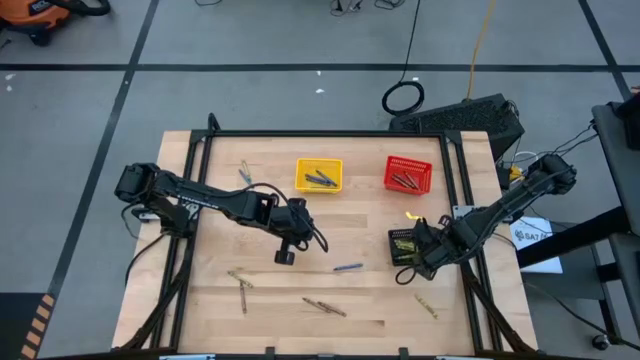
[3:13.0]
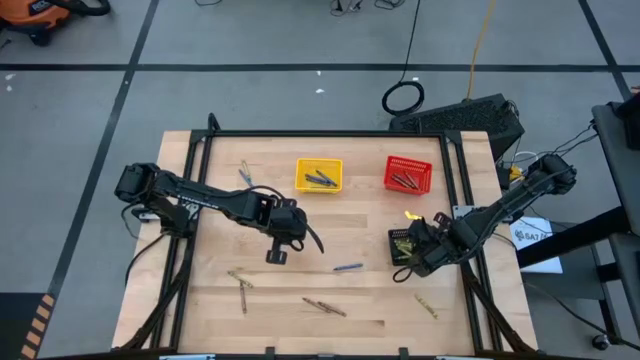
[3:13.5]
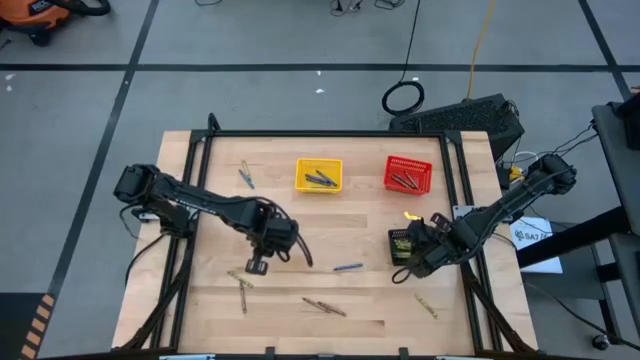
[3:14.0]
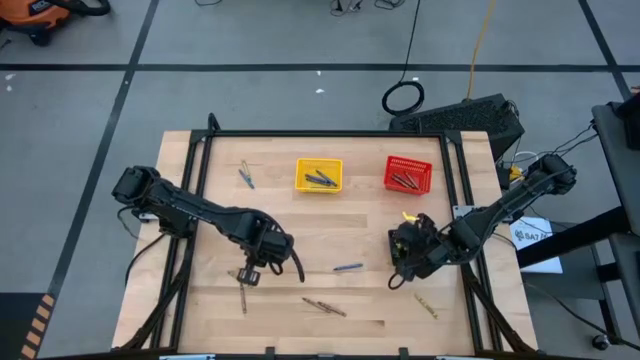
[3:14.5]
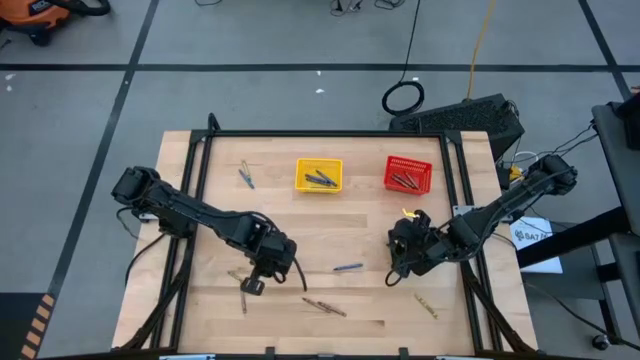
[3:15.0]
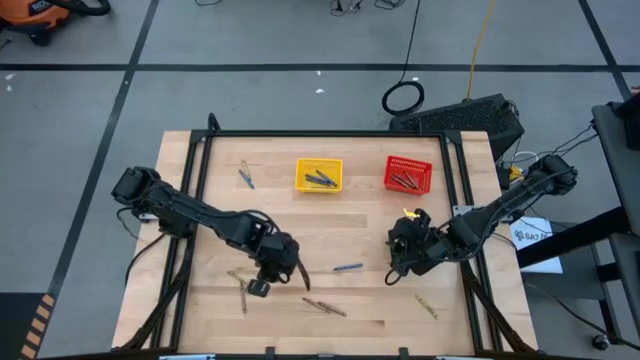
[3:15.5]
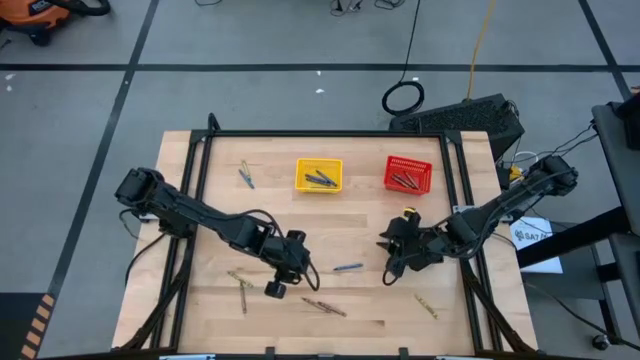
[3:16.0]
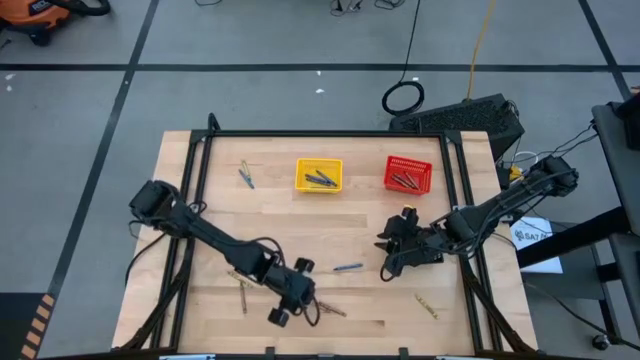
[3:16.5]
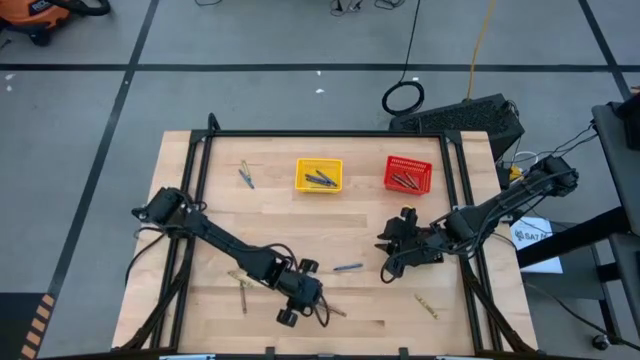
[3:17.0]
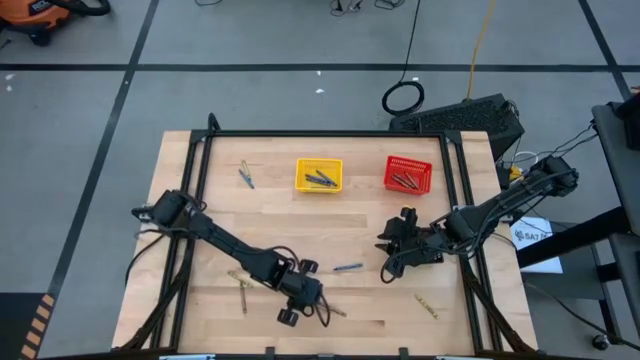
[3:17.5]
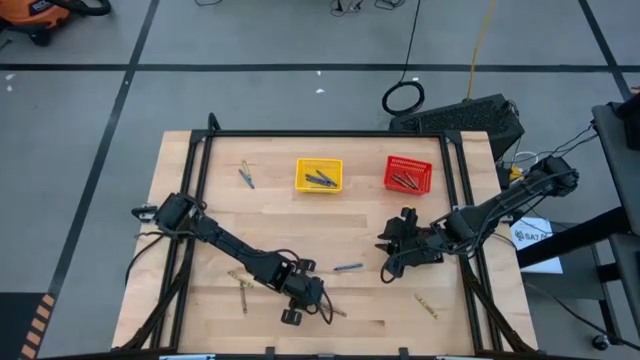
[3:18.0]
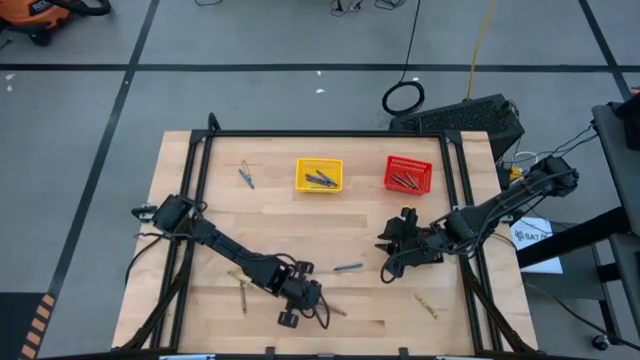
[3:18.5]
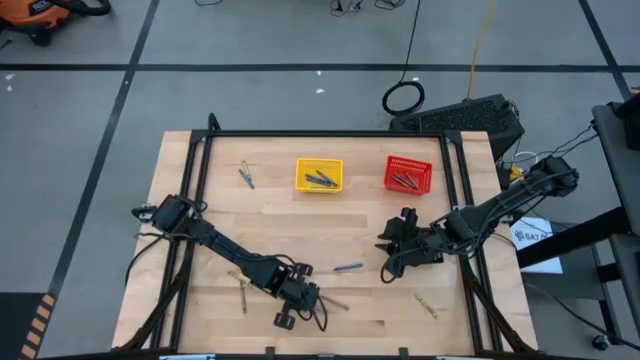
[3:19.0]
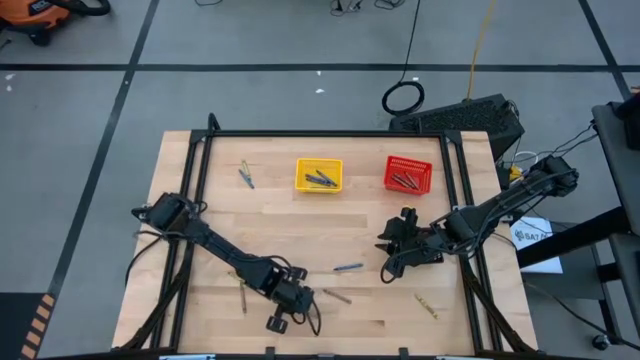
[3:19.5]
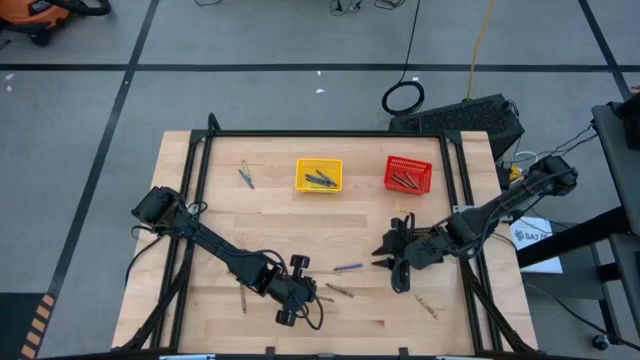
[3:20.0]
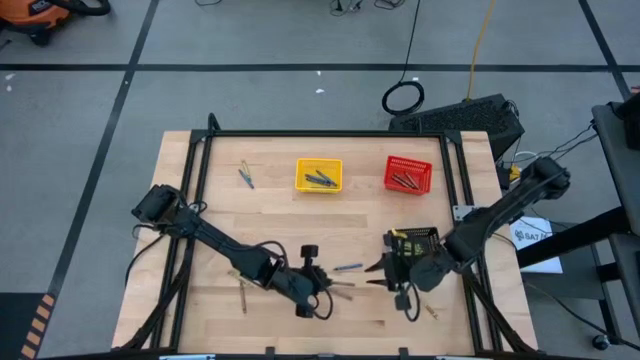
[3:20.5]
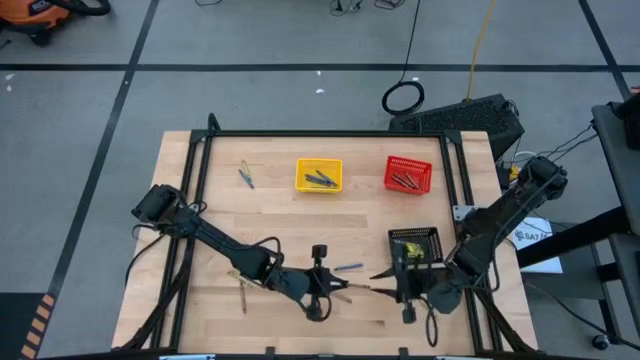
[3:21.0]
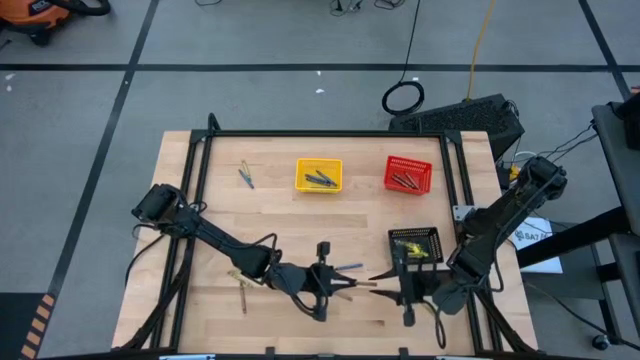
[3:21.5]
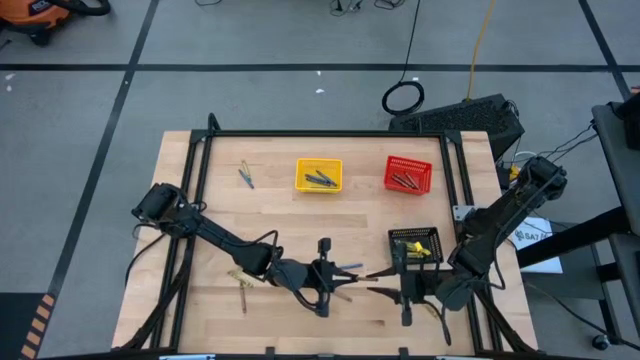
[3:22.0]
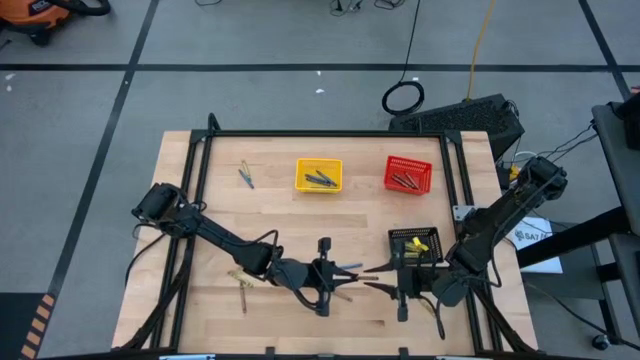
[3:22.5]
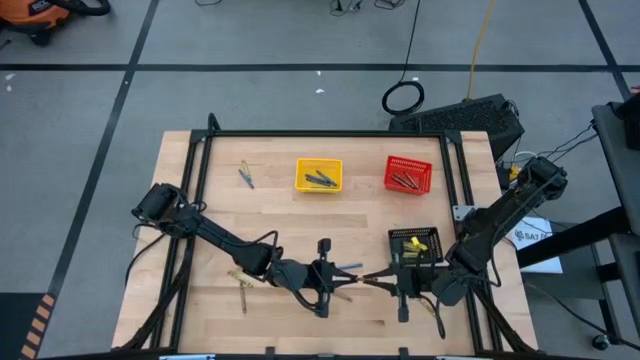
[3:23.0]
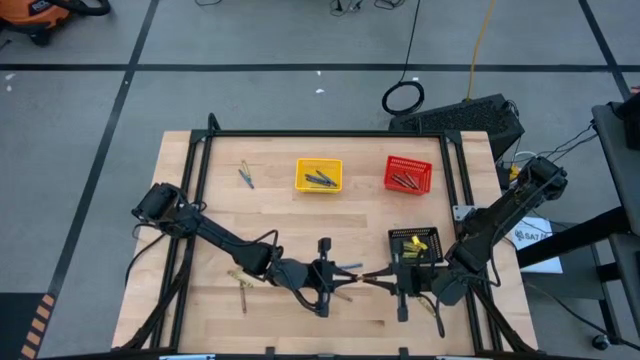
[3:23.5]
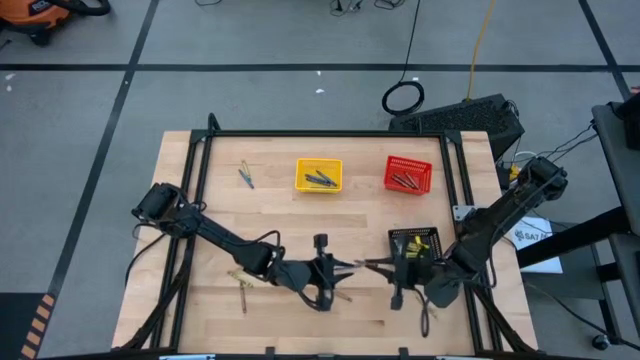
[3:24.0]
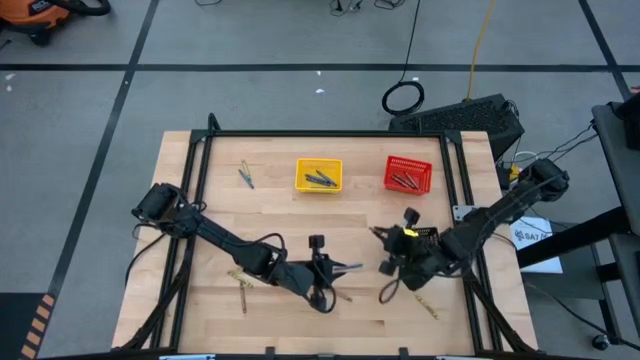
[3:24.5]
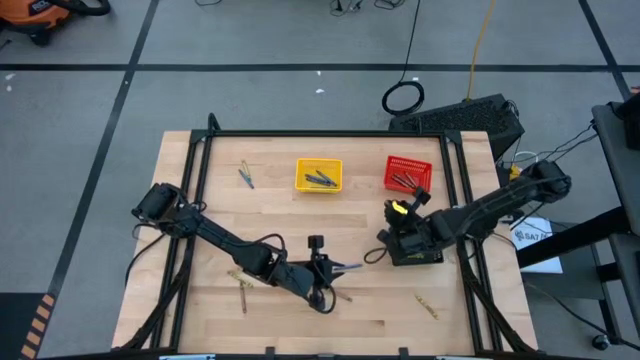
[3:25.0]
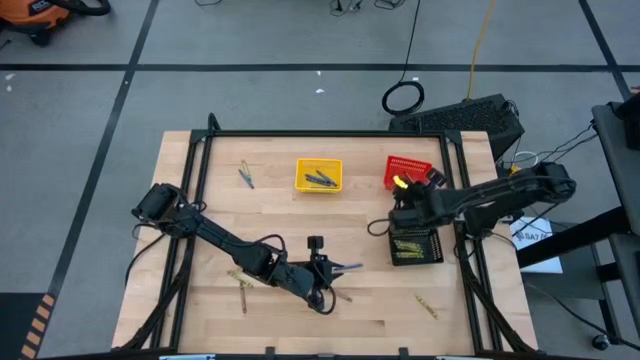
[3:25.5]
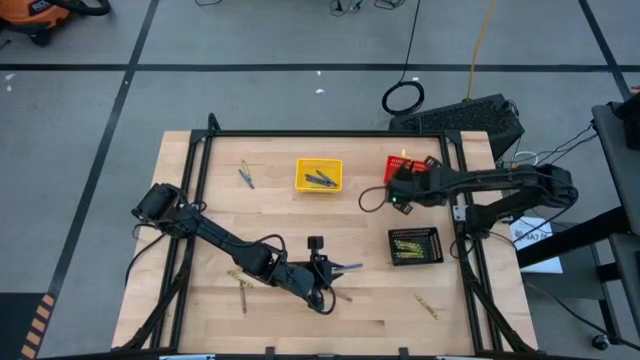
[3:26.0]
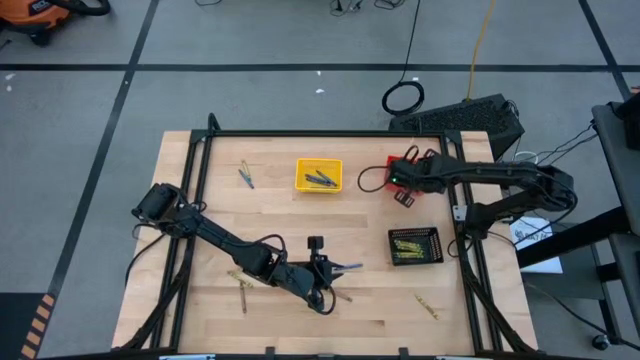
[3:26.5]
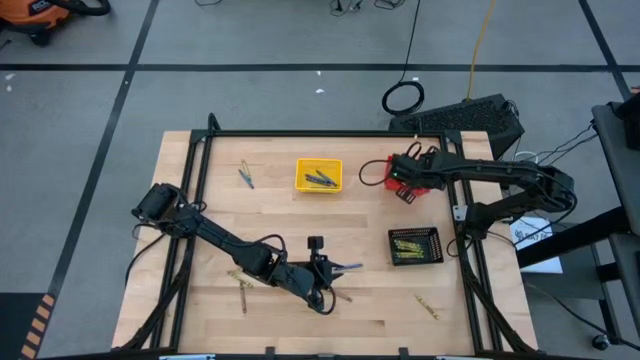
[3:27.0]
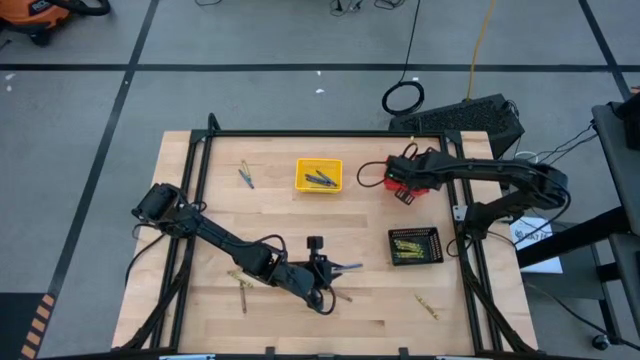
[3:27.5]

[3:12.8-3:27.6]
Task: Sort crayons
Put the brown crayon into the red bin

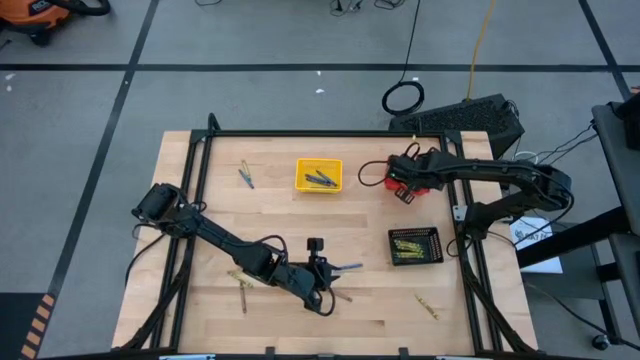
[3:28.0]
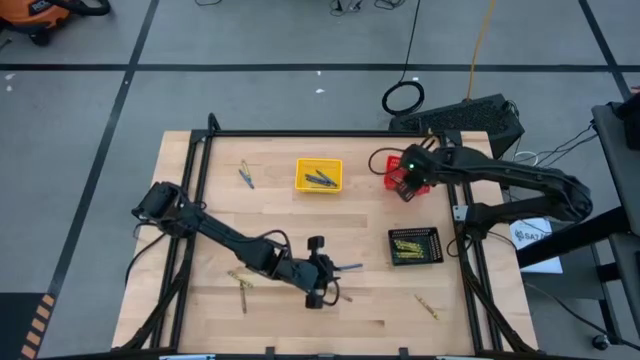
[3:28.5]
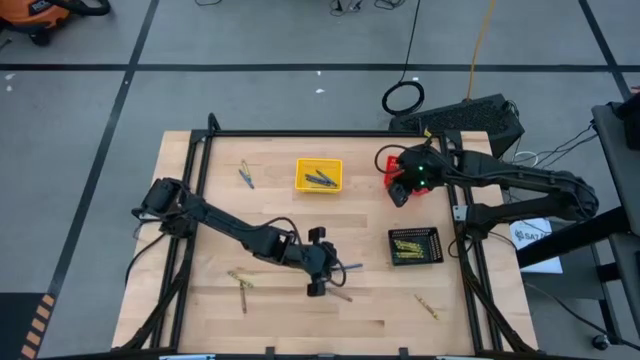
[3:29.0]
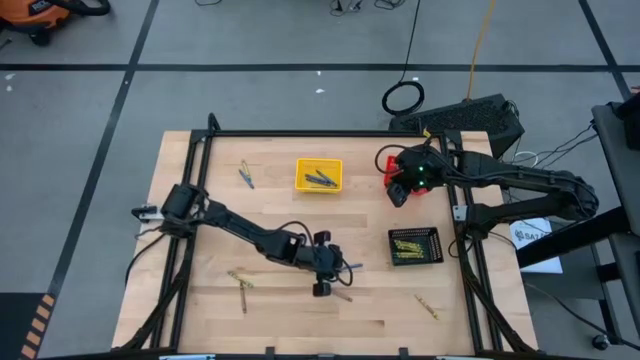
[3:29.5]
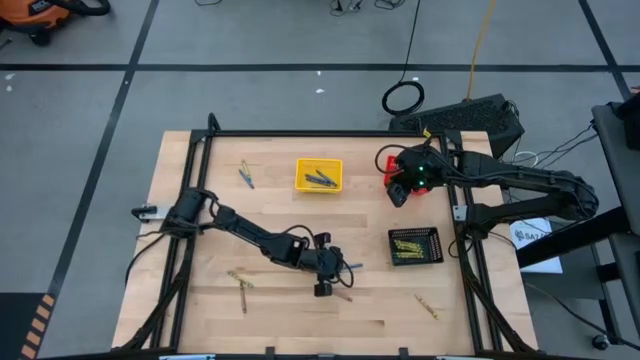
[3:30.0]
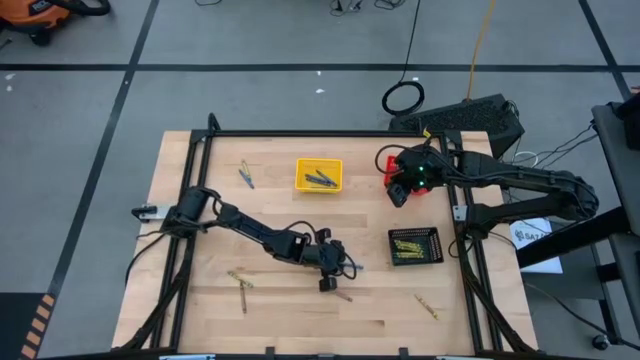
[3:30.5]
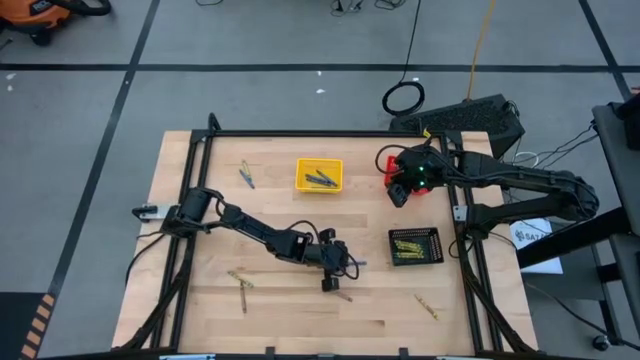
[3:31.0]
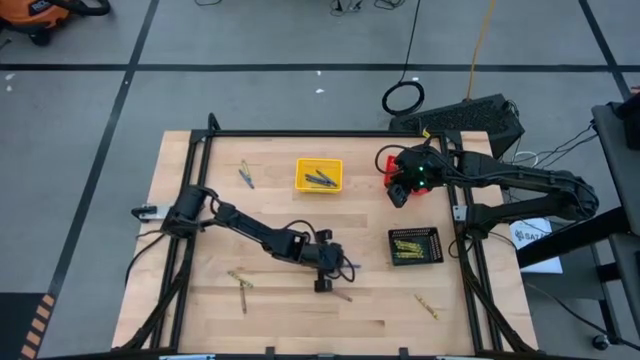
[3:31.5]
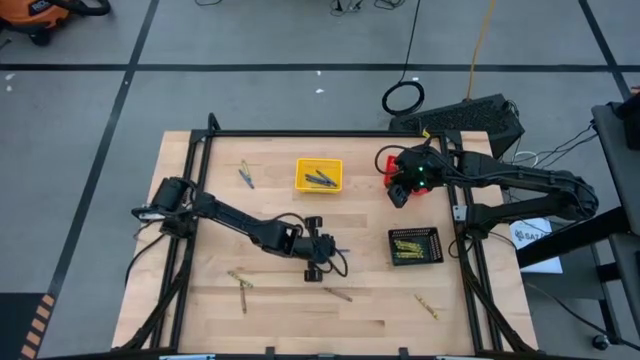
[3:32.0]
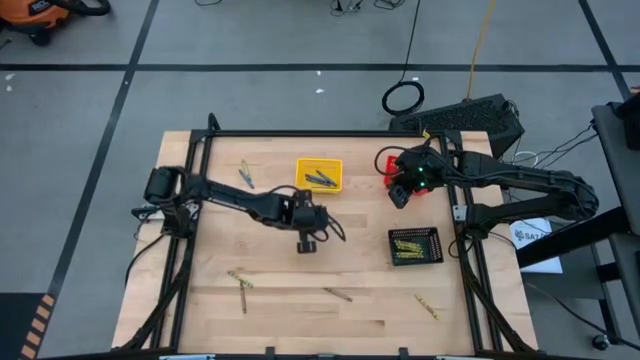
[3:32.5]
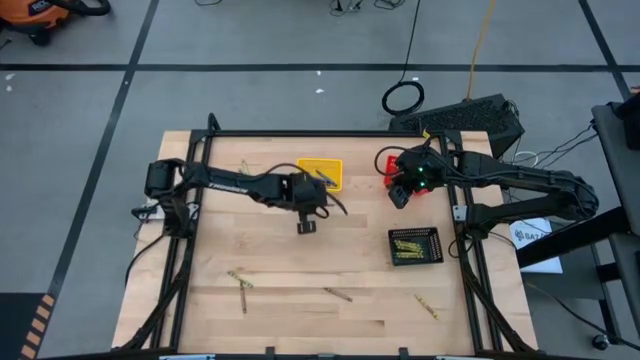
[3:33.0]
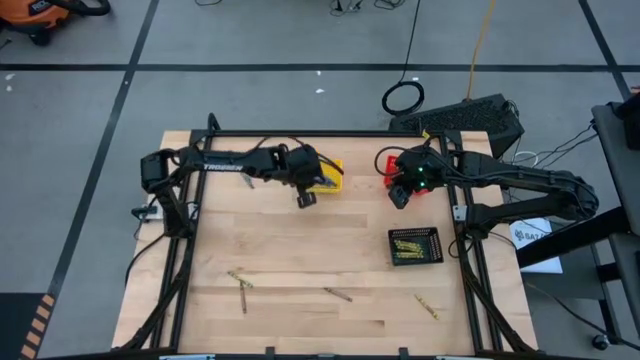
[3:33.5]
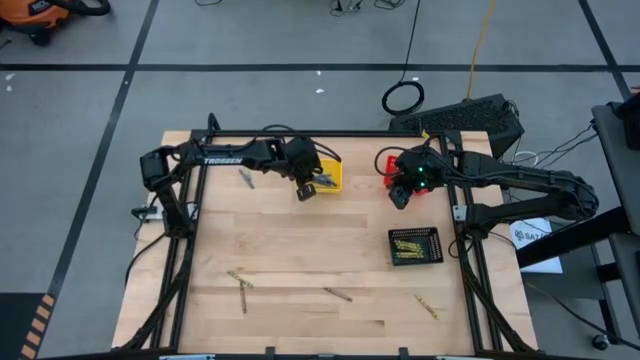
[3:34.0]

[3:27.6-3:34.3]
Put the blue crayon into the yellow bin
